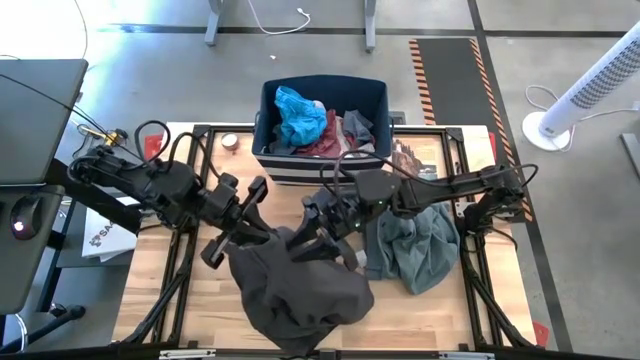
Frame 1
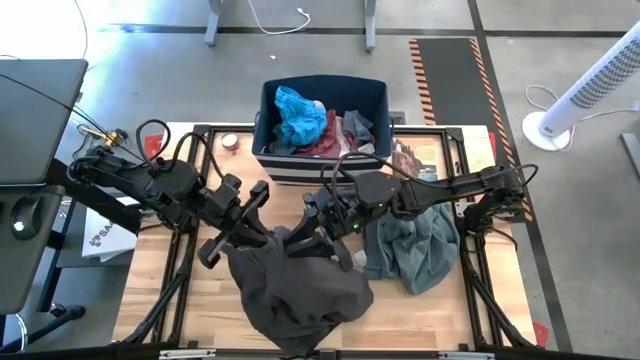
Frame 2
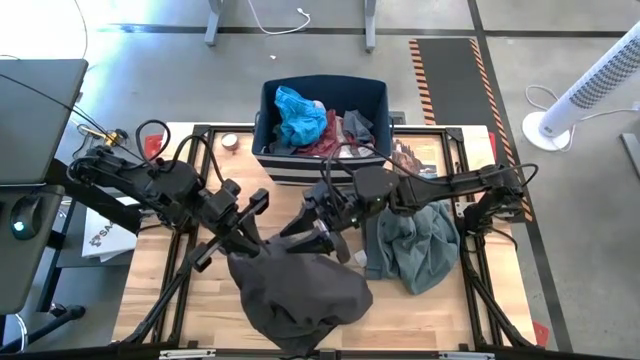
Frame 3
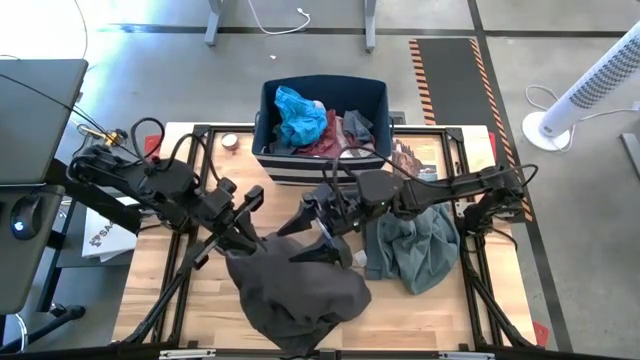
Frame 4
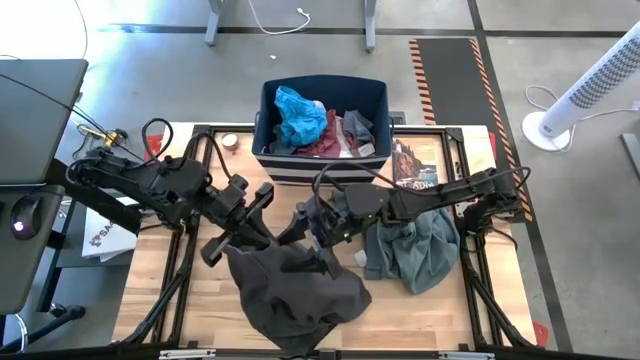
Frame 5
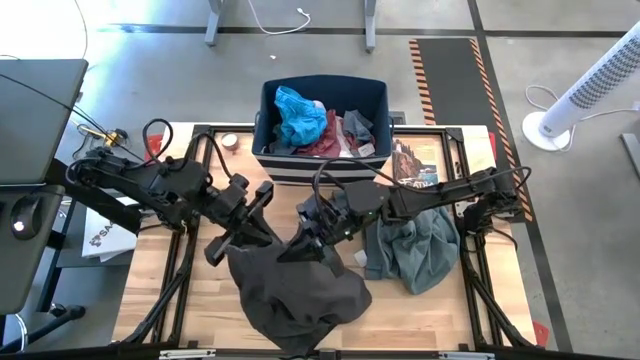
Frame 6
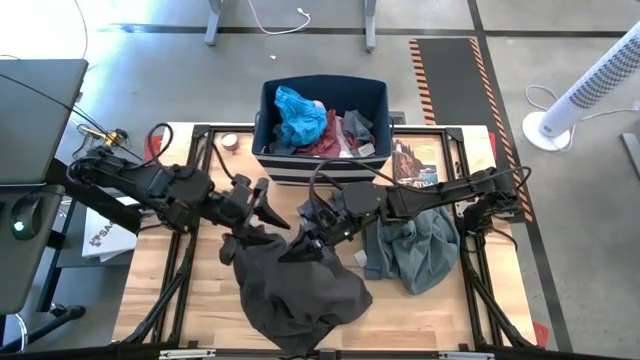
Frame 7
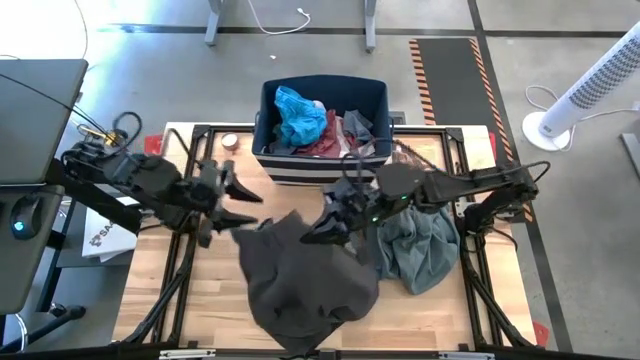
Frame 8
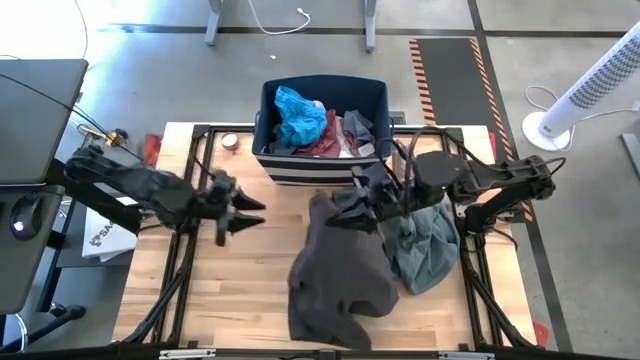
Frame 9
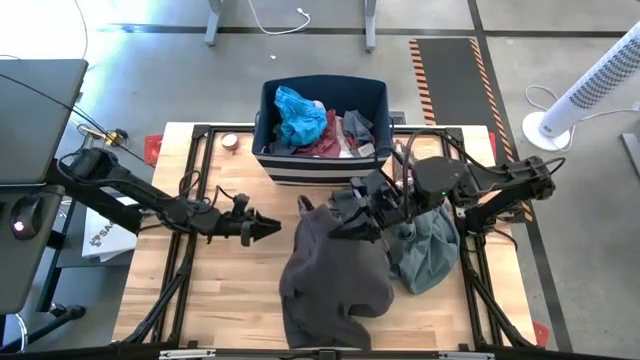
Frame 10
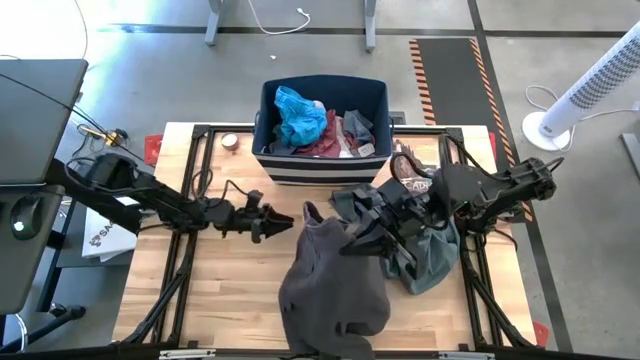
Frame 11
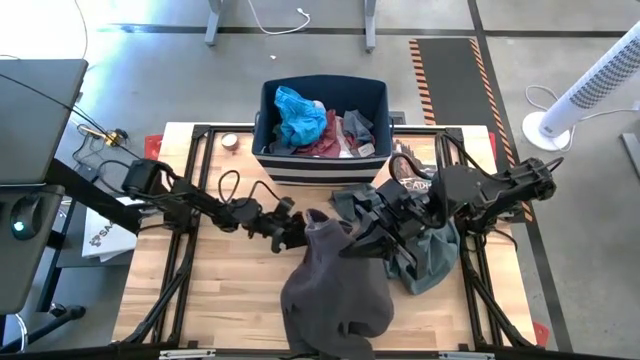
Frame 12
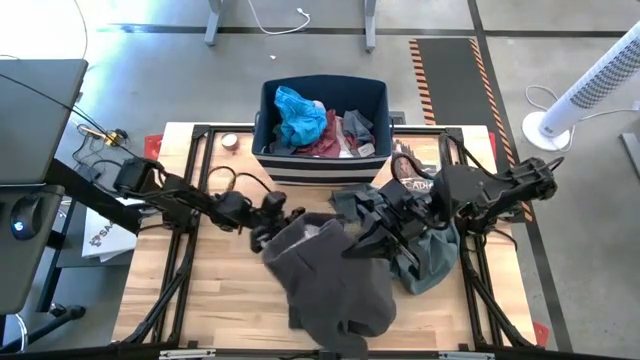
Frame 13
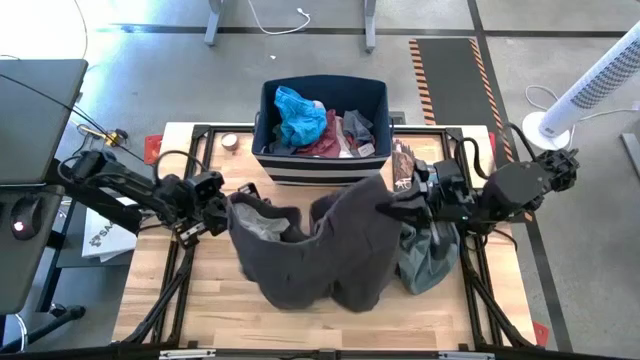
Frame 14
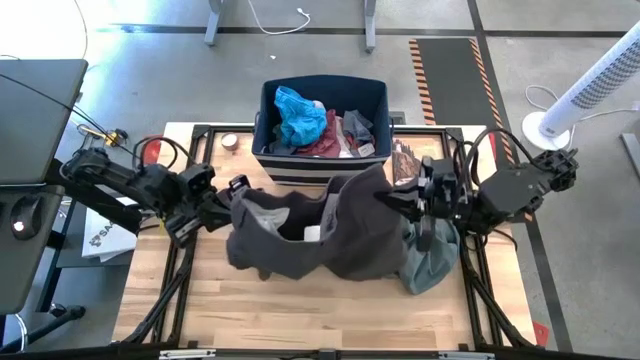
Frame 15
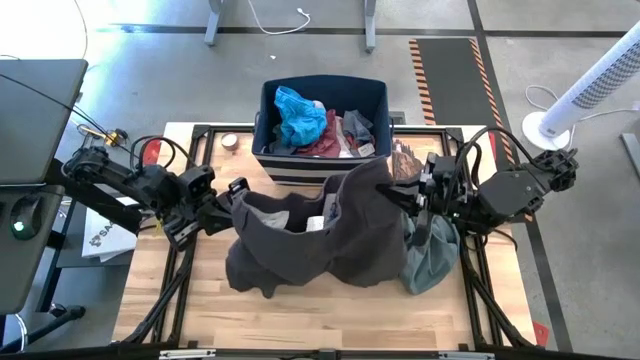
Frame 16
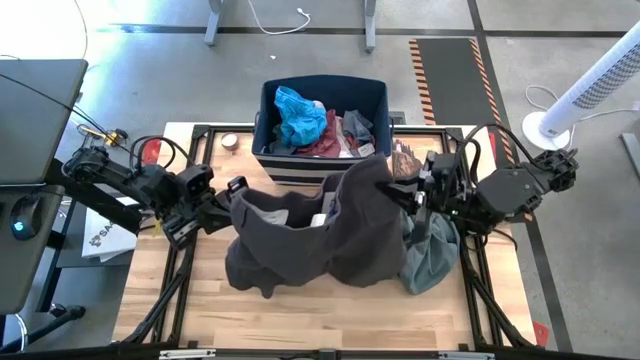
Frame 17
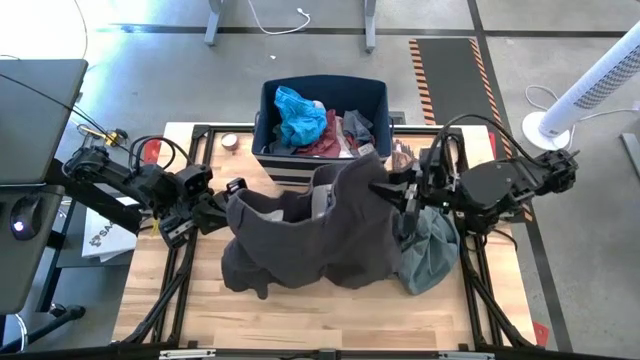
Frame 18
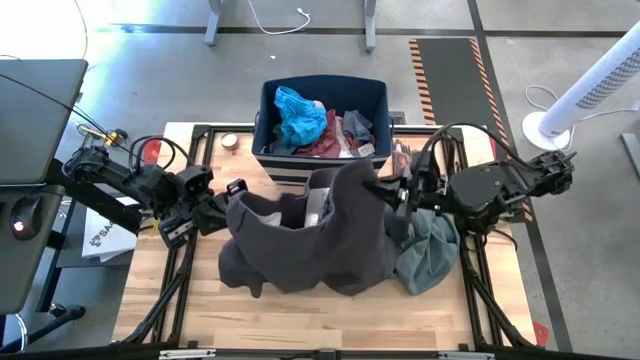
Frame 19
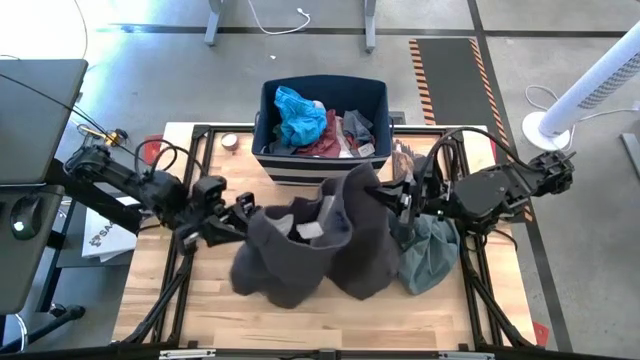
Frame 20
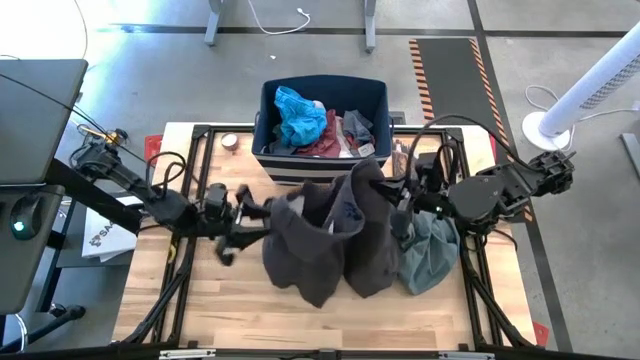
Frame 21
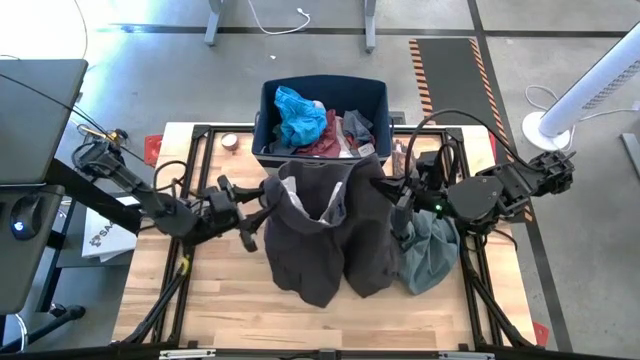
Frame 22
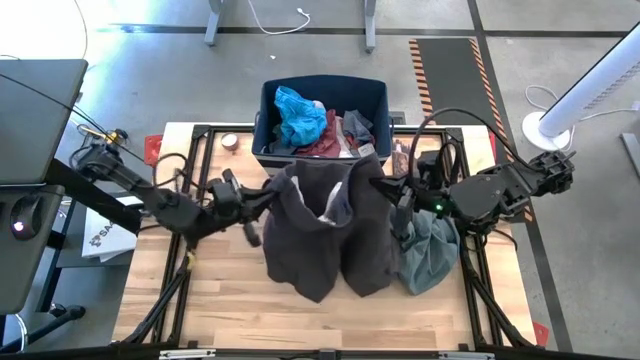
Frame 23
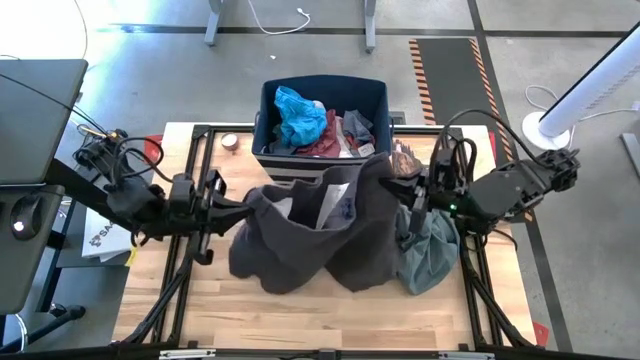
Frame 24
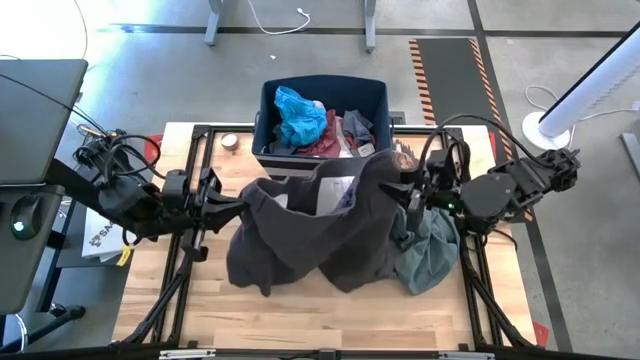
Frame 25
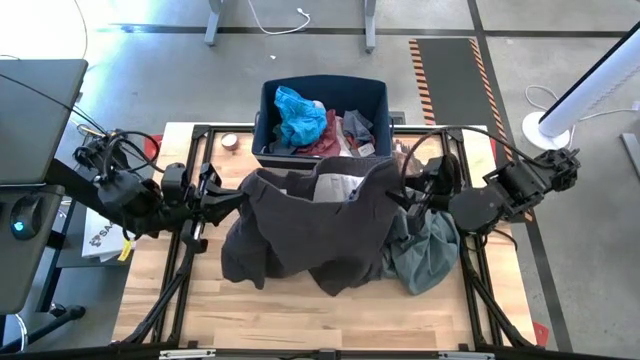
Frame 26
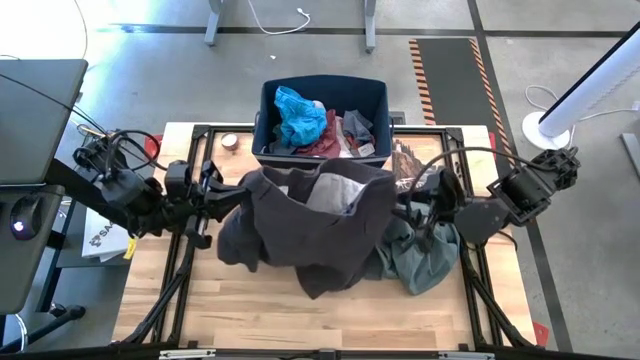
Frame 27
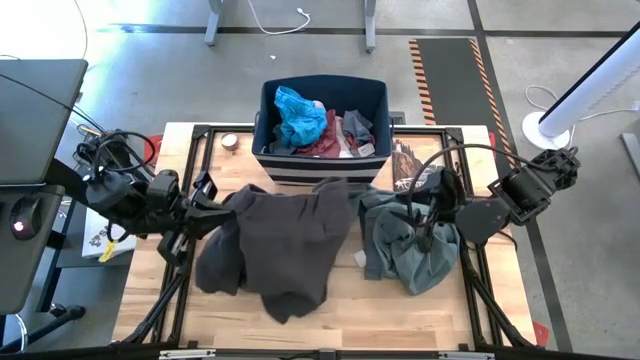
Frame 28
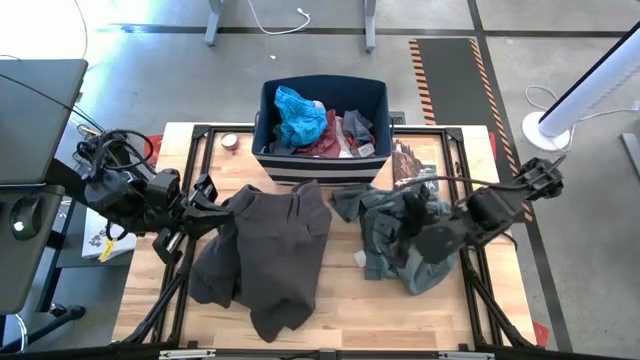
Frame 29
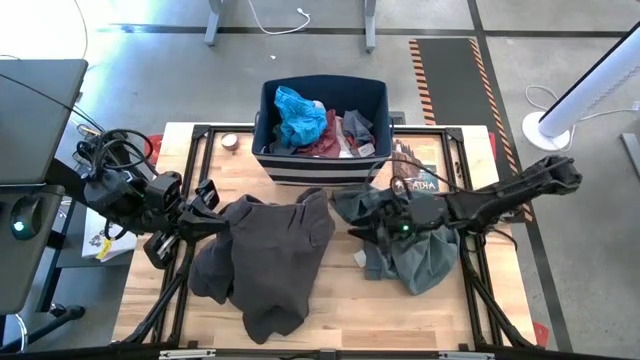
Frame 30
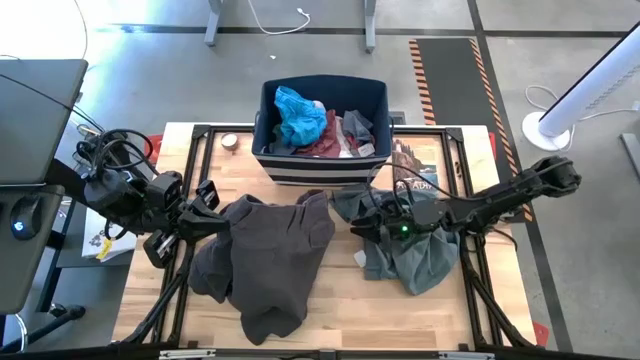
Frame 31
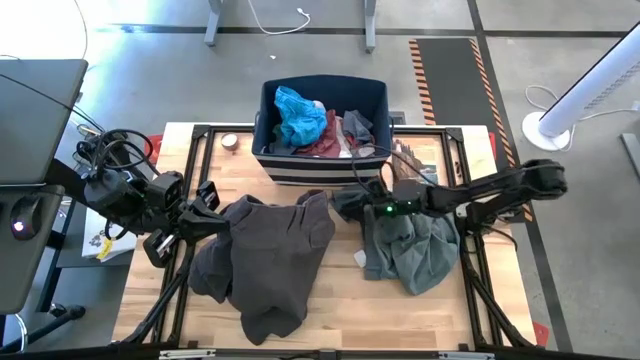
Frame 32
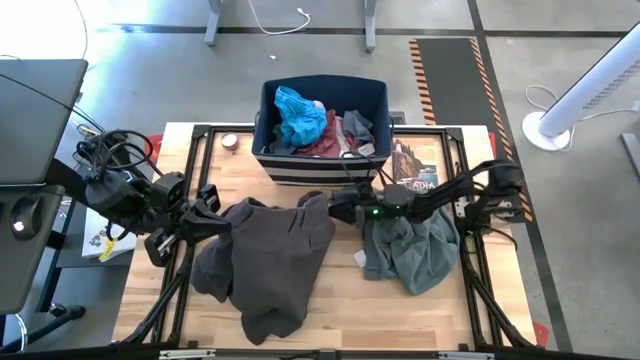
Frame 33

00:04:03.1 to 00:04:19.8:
Task: Sort clothes
Fold the dark grey short

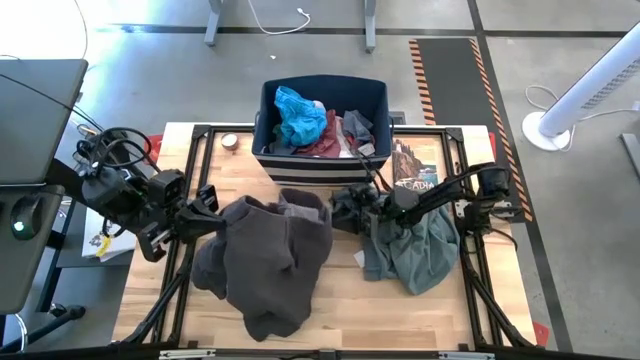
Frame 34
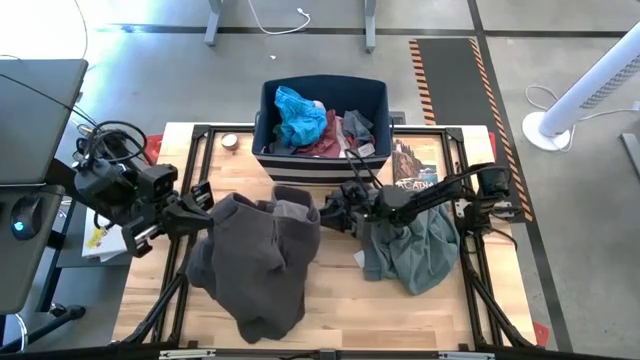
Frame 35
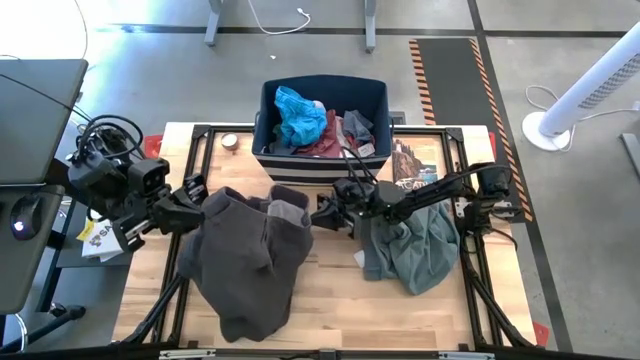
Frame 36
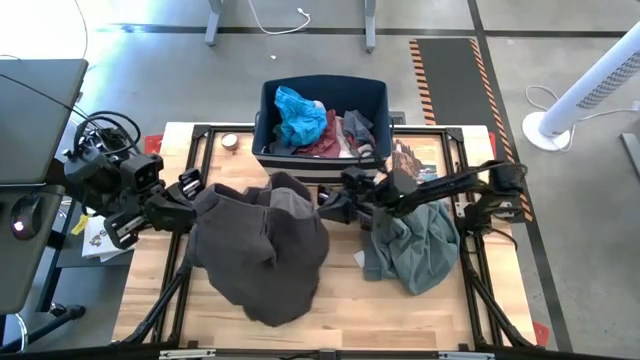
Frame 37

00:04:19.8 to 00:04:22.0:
Fold the dark grey short

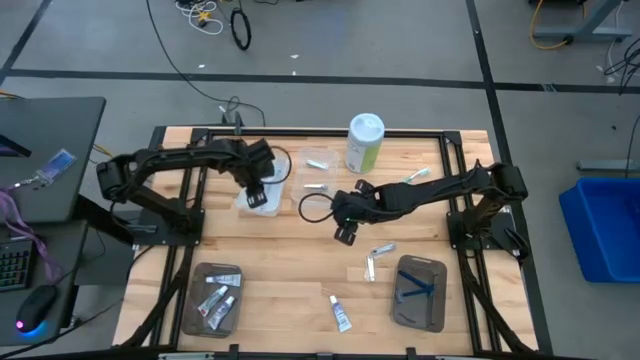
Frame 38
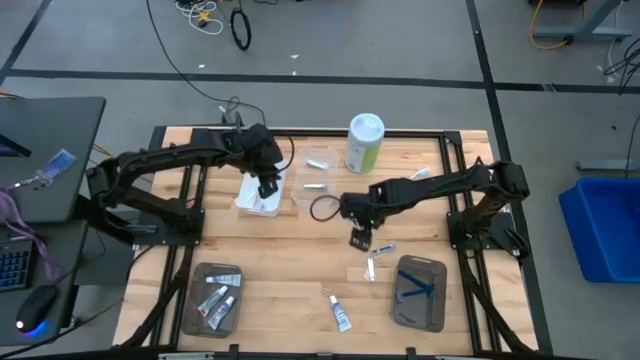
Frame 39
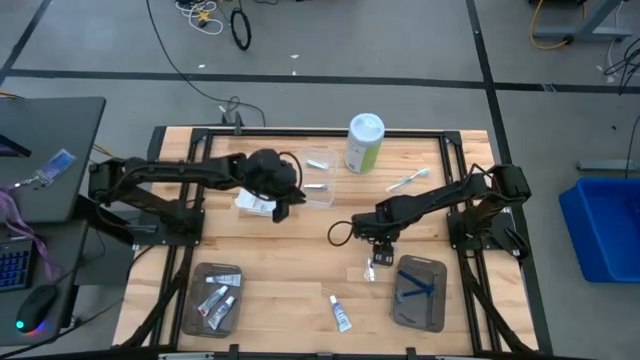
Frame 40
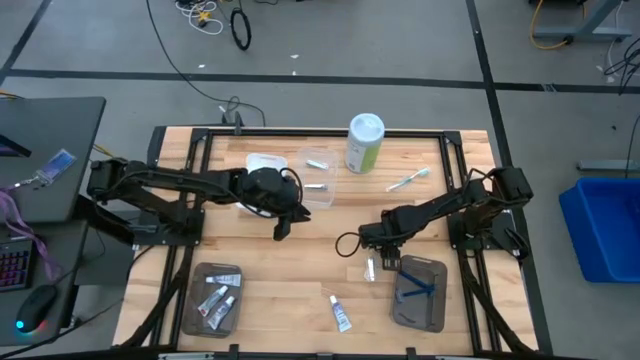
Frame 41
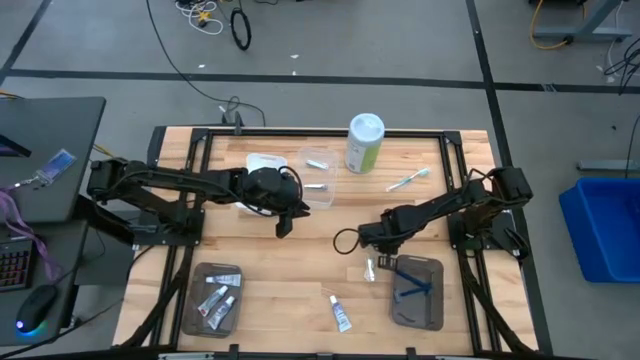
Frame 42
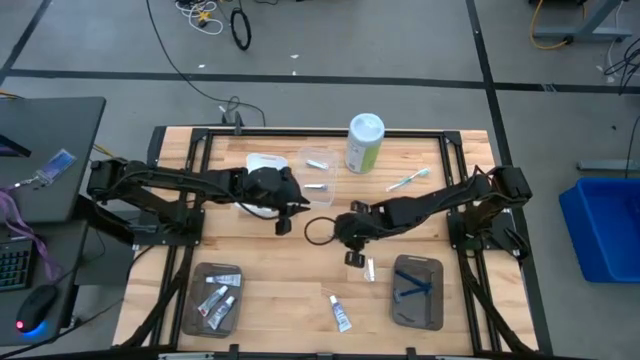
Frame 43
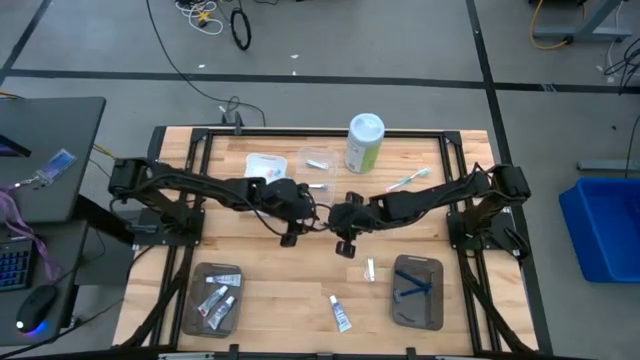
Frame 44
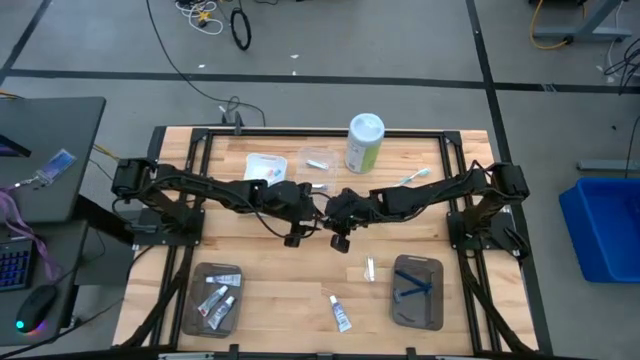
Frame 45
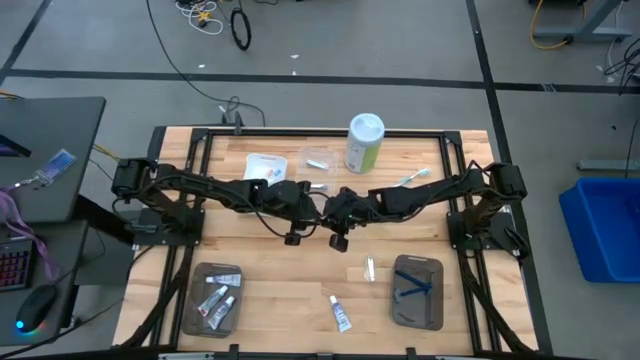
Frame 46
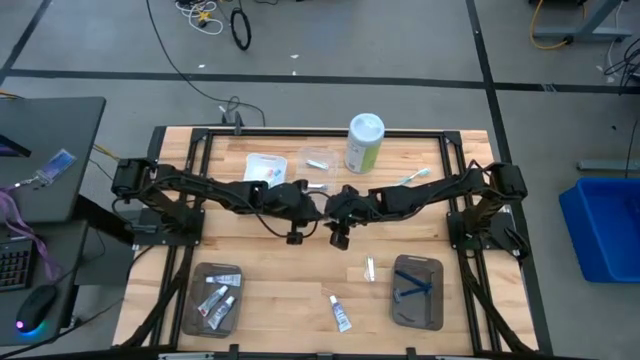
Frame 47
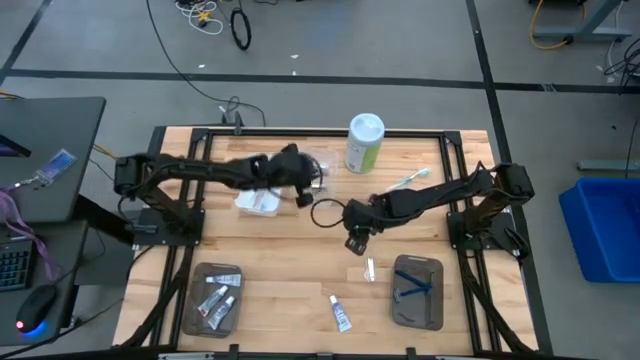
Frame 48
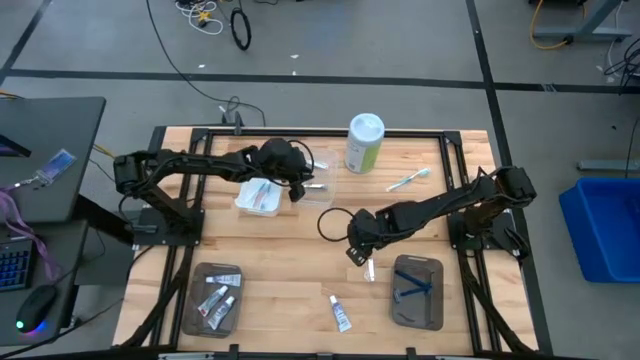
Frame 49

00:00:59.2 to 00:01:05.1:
Task: Pick & Place Travel size toiletries
Put the nail cutter into the transparent bin
